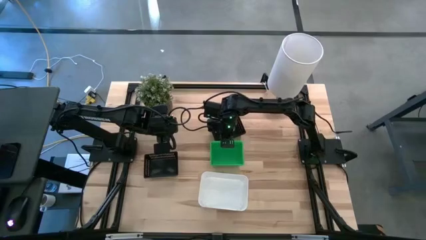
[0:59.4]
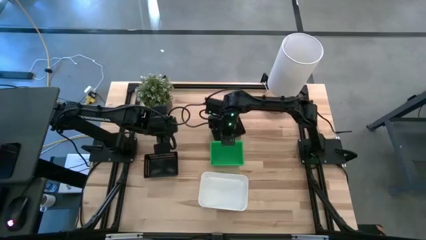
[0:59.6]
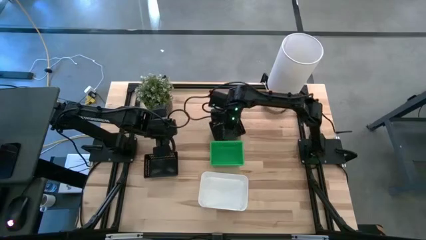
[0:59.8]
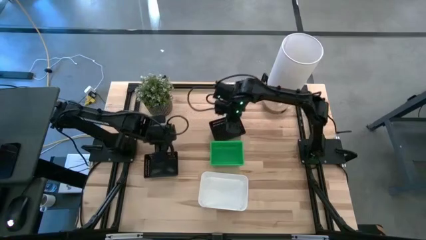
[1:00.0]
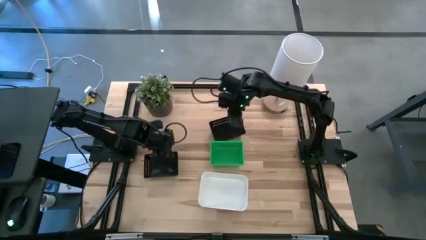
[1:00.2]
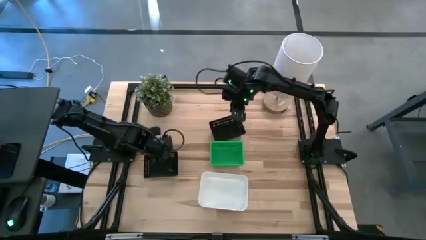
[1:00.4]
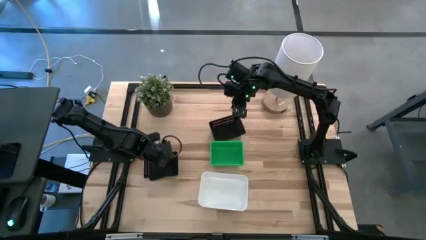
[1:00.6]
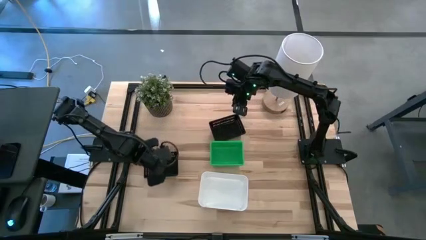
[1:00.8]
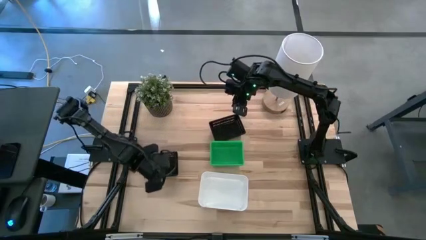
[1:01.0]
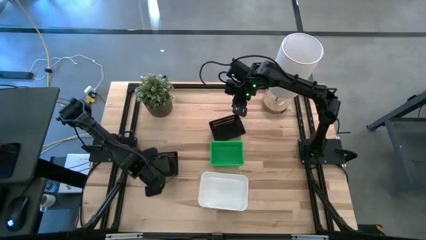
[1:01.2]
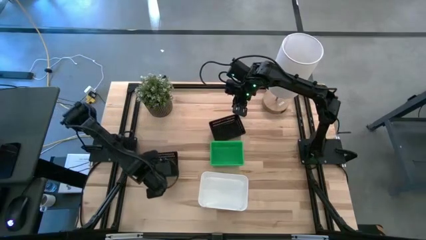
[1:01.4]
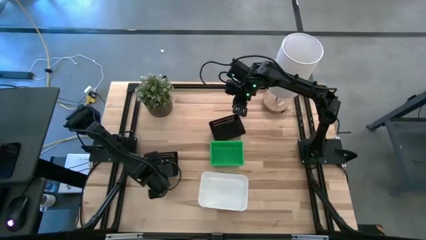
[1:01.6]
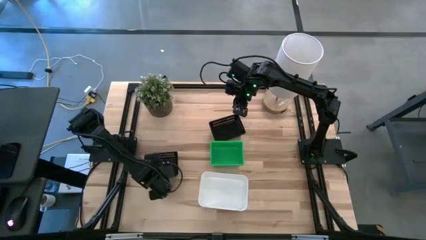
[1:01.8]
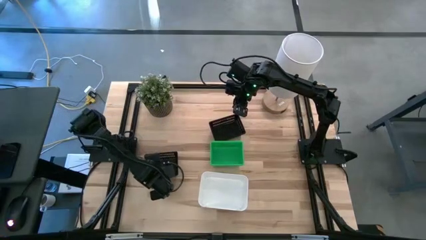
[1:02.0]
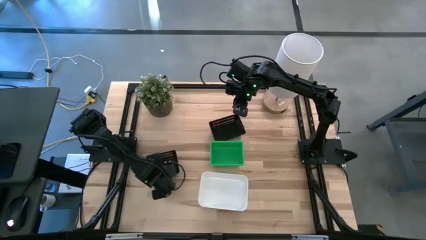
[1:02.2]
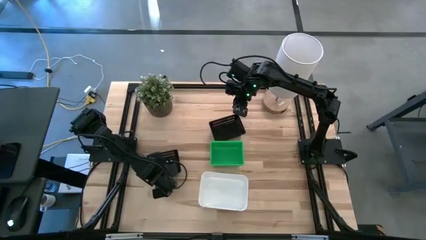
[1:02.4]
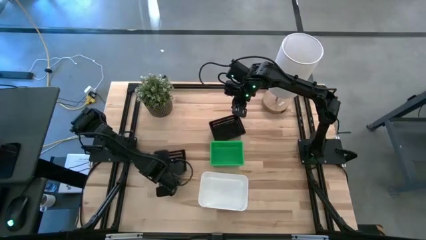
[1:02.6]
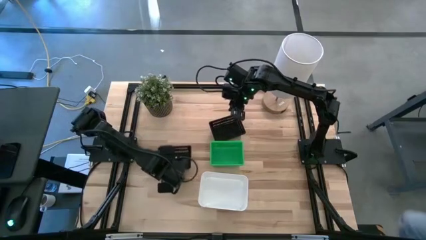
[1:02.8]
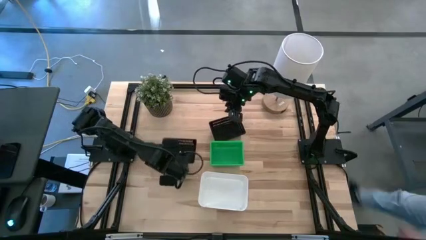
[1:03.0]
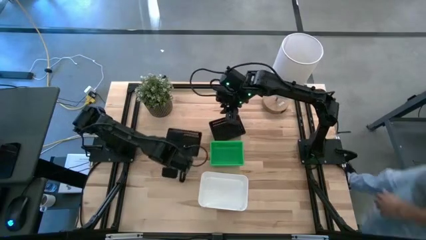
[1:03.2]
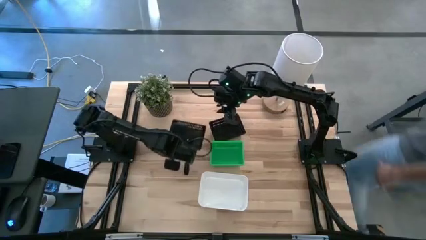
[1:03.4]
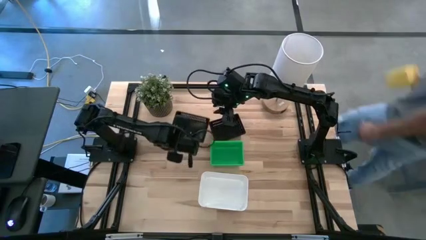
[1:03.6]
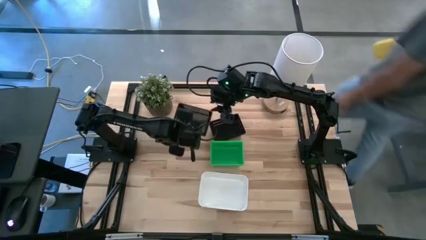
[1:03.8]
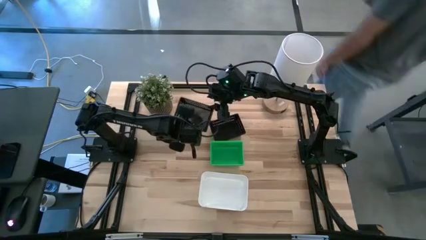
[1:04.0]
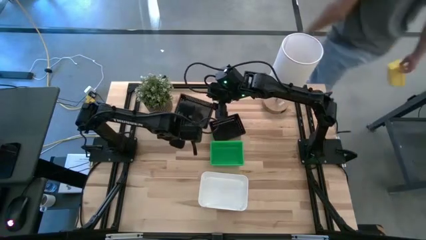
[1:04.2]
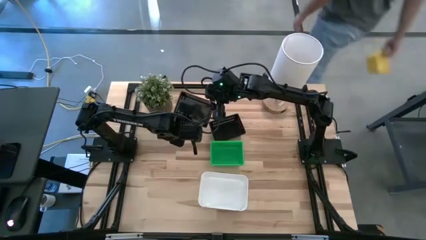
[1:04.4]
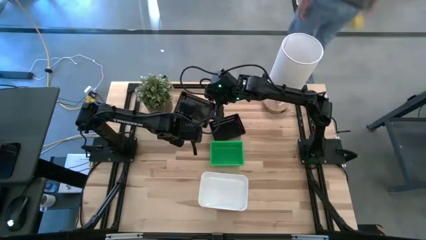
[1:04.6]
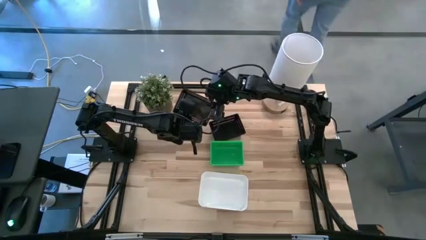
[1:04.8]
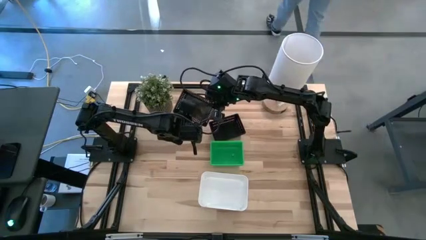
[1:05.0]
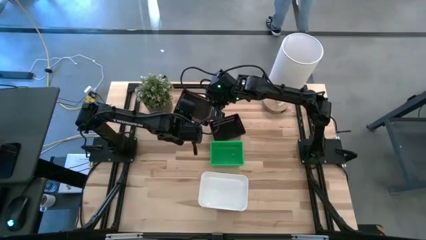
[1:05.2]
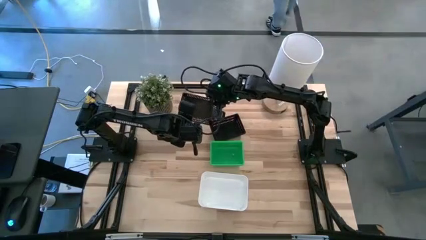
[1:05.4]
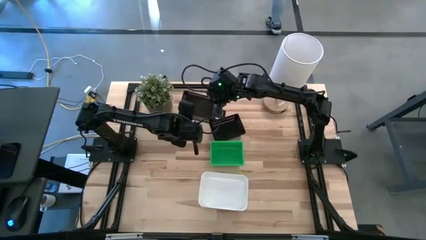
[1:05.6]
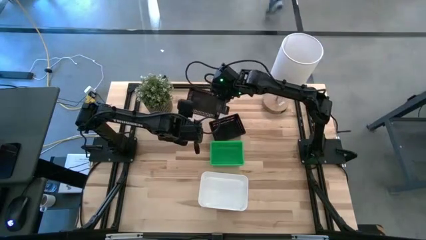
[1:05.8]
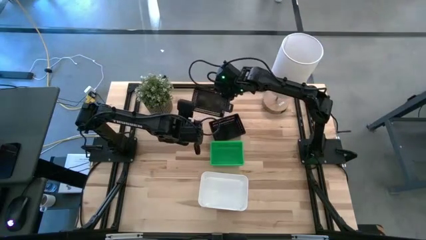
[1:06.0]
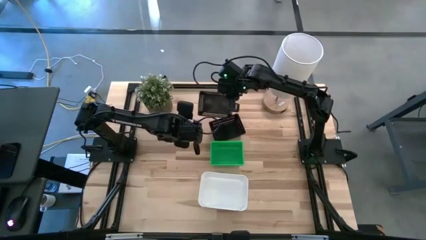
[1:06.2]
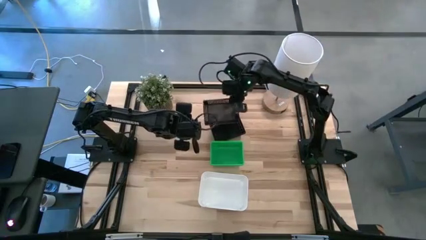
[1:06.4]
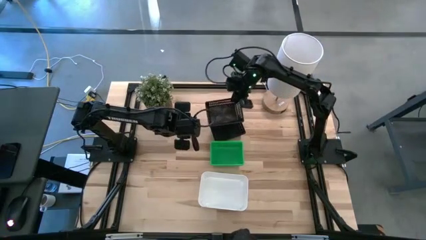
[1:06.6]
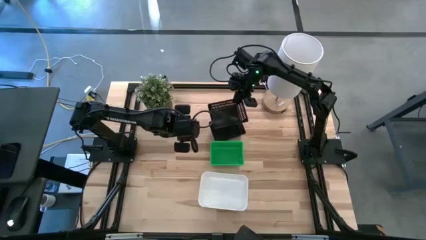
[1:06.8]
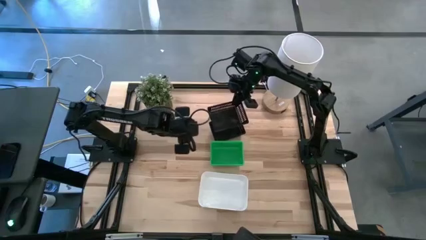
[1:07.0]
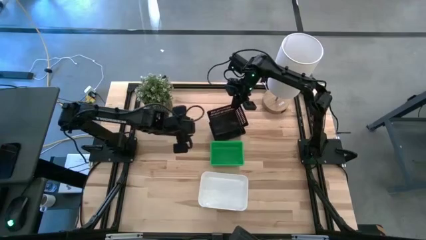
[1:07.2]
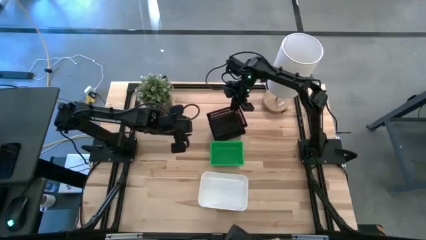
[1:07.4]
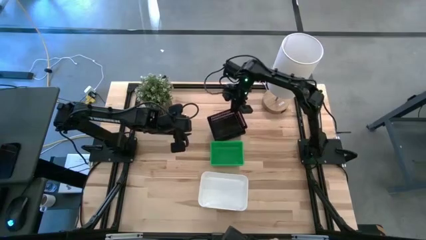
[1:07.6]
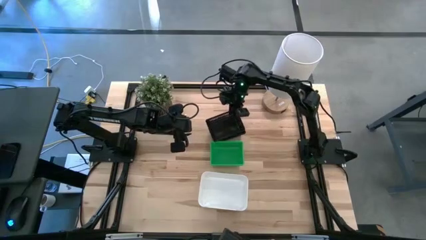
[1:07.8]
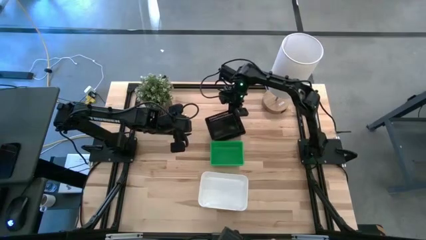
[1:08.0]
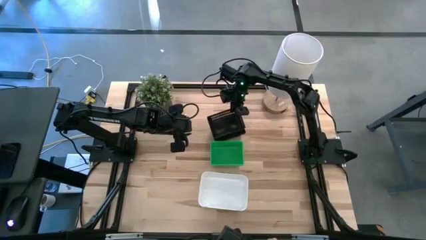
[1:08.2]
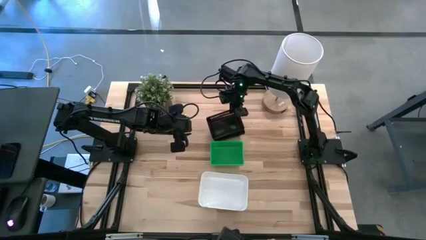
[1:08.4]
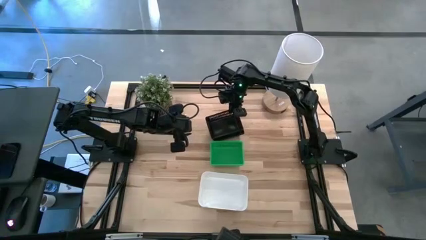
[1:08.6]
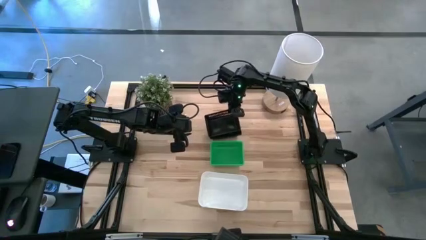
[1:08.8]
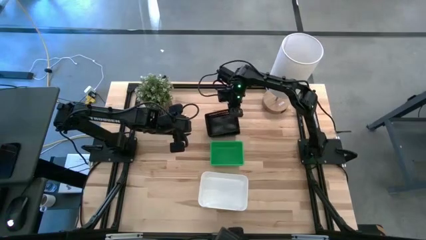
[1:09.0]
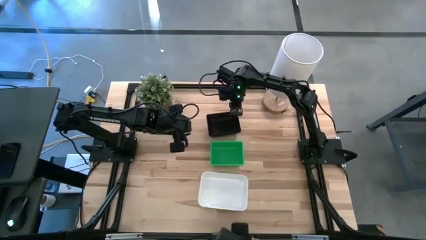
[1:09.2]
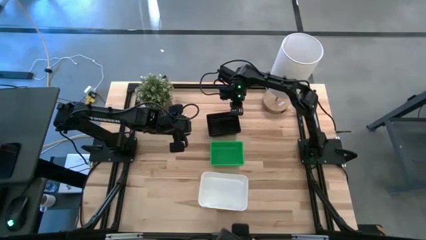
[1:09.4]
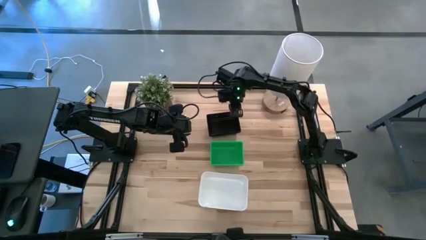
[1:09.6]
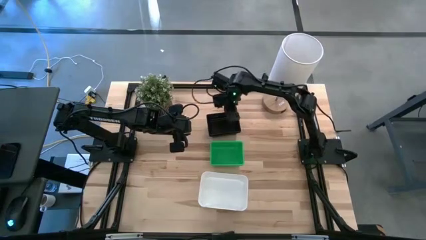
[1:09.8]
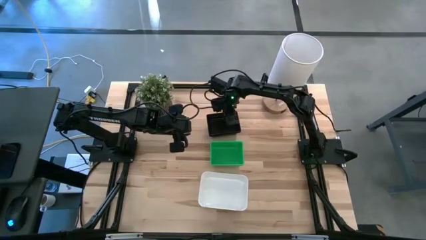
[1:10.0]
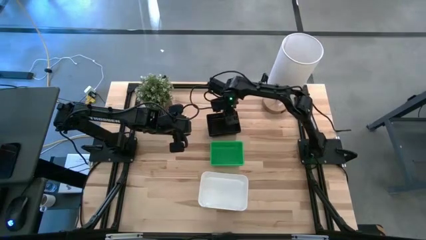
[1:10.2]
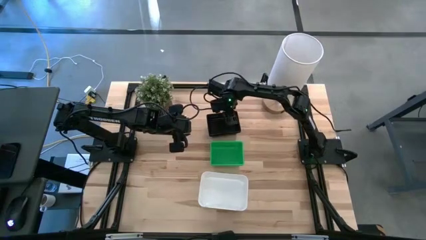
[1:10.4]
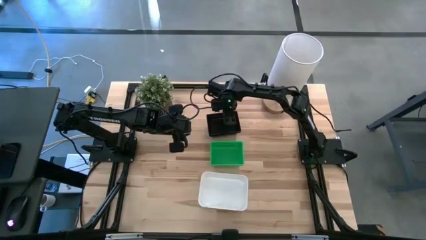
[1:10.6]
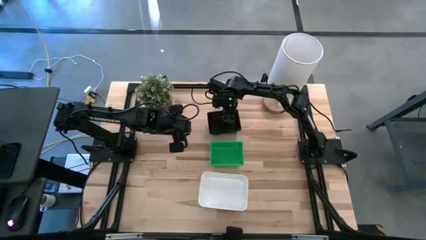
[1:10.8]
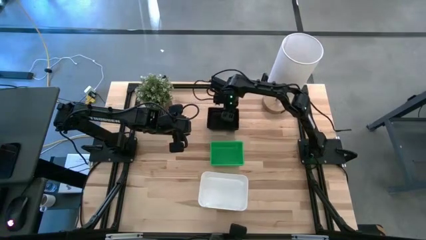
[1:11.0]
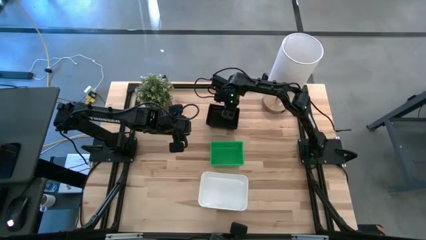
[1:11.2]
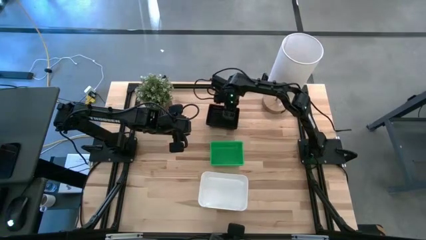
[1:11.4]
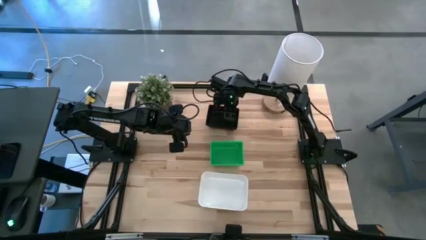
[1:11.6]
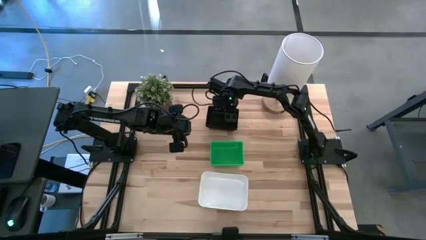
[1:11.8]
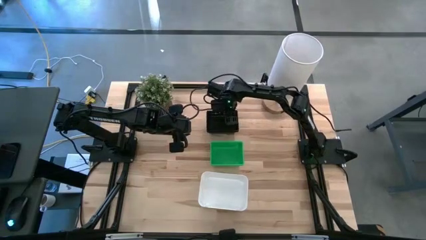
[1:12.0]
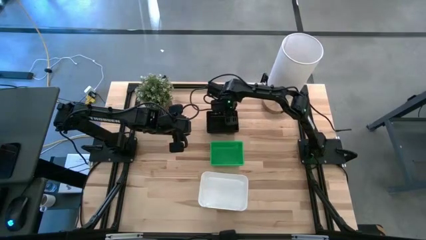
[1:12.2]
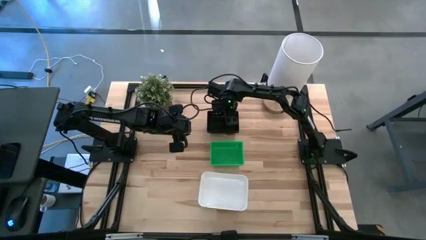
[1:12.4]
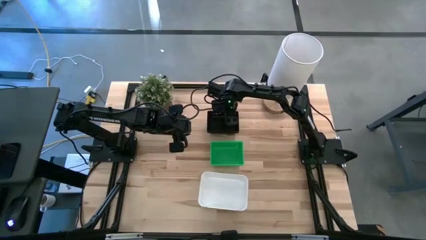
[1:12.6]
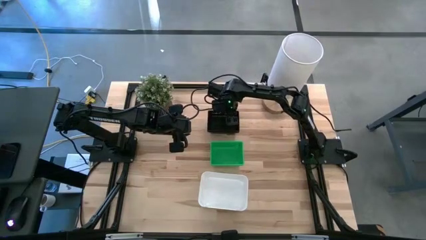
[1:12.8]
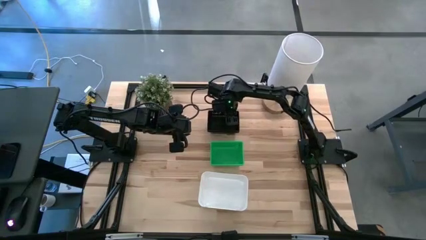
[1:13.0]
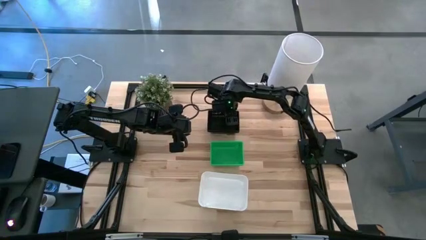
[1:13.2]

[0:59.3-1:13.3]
Stack the bottom black bin on the stacked black bin

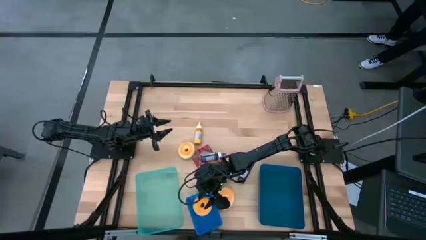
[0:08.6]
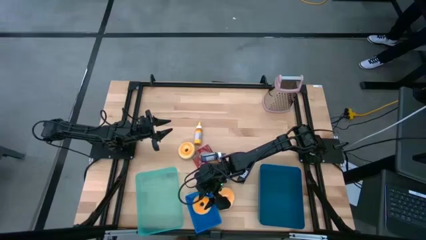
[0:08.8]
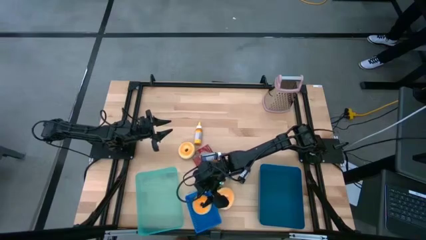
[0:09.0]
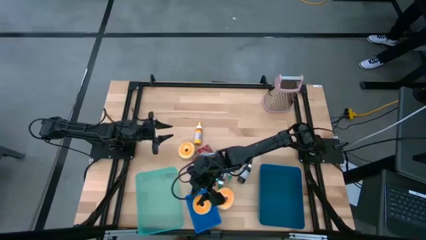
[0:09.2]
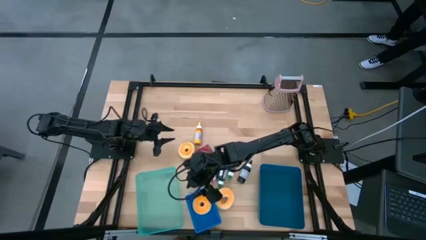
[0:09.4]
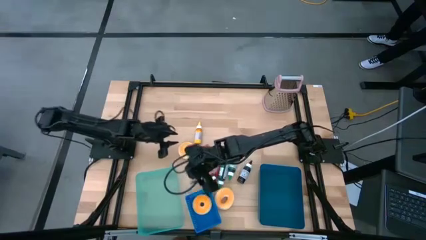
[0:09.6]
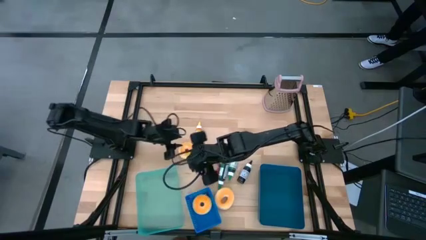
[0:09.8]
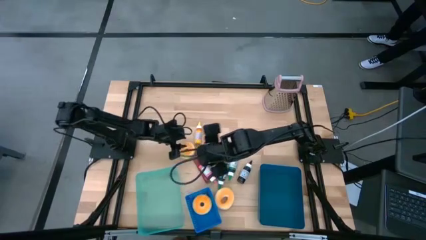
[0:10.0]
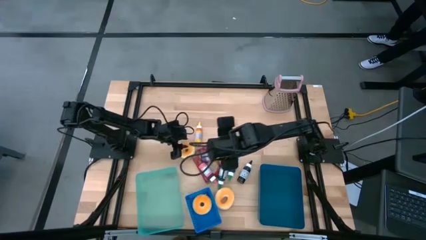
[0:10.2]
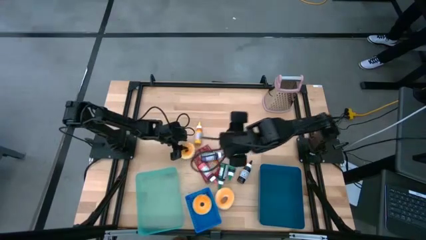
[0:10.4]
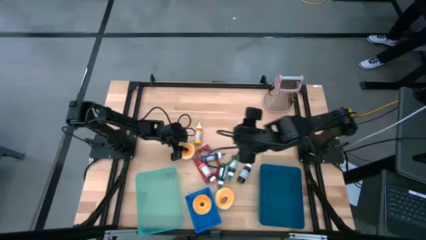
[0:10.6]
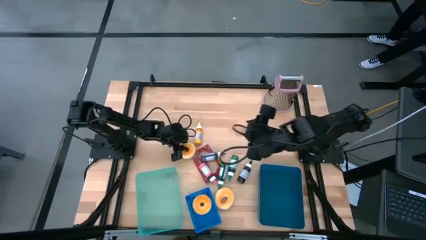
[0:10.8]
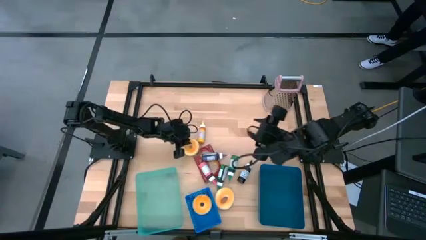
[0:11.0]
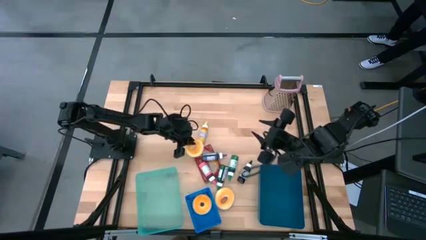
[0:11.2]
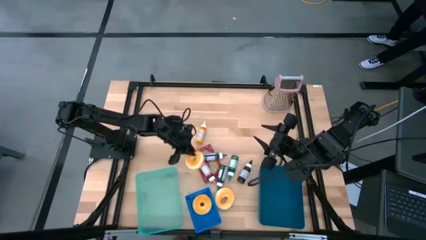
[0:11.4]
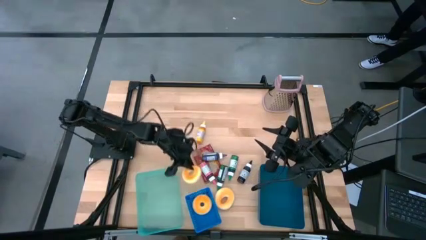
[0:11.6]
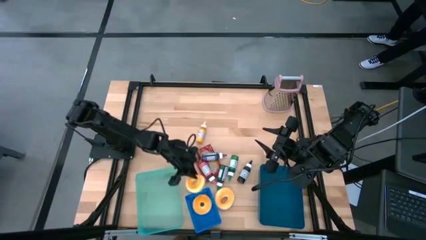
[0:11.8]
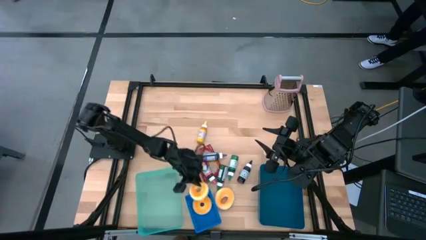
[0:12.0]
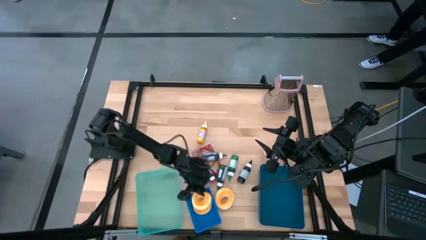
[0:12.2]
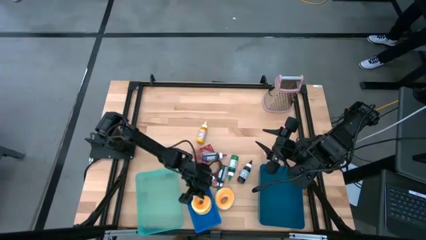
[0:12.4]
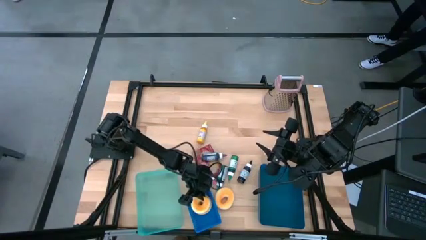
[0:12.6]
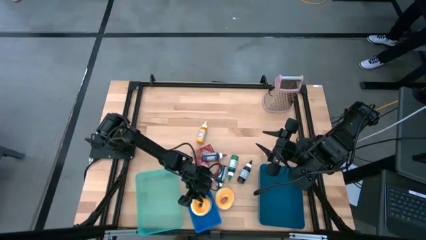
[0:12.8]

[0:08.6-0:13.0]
Put the top donut into the blue bin
